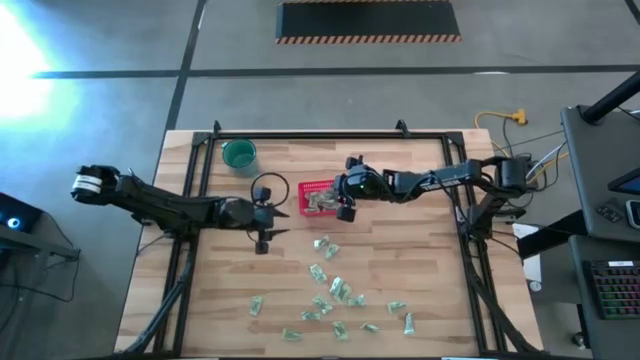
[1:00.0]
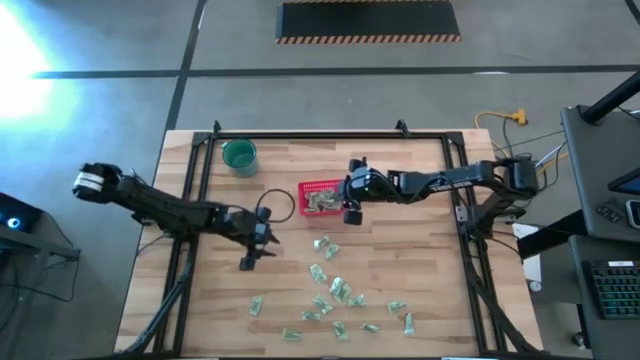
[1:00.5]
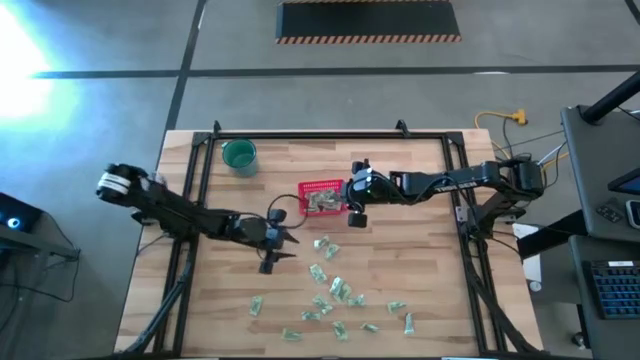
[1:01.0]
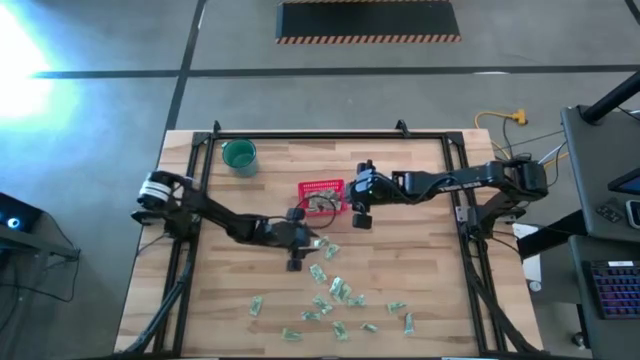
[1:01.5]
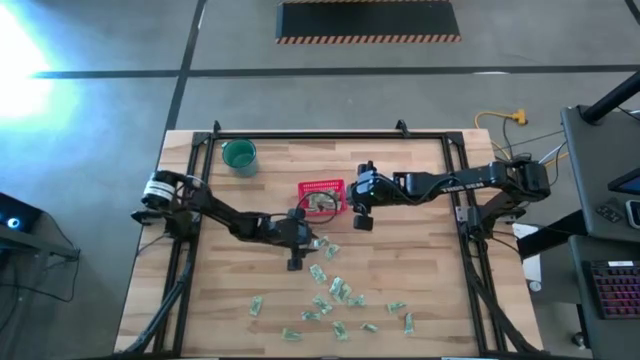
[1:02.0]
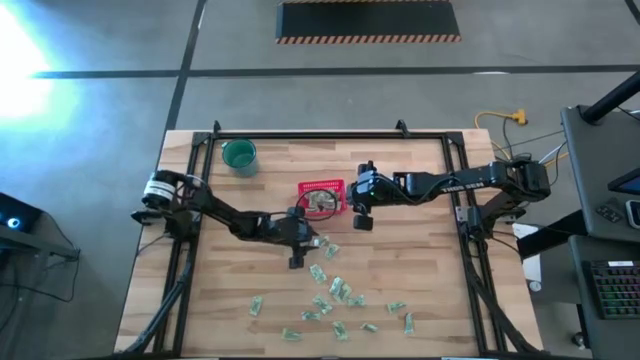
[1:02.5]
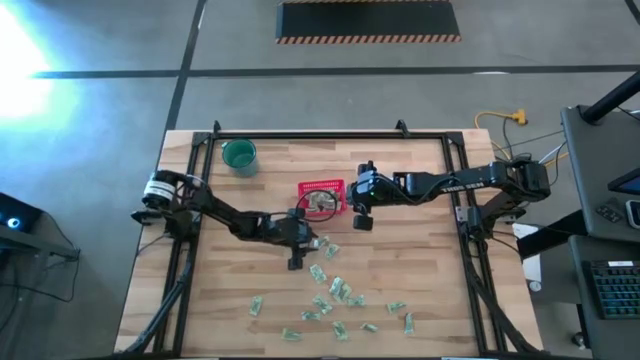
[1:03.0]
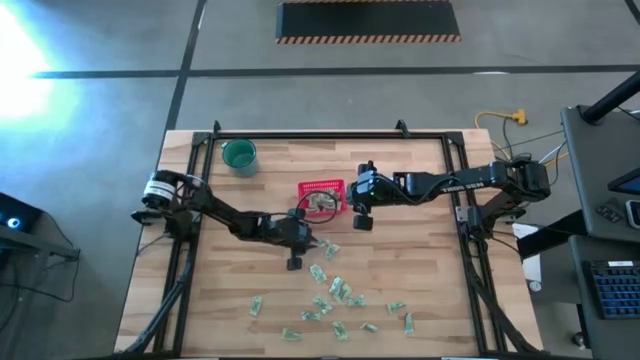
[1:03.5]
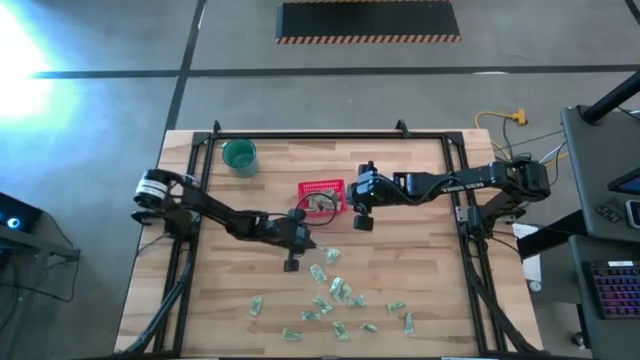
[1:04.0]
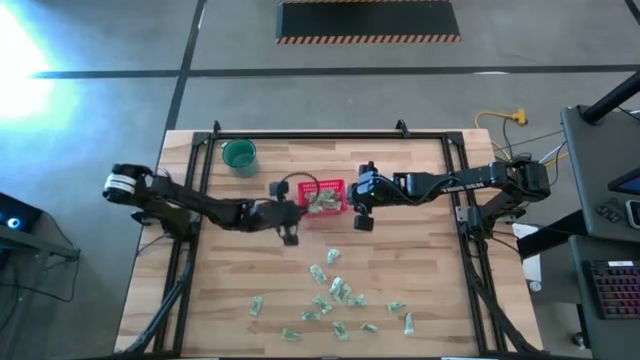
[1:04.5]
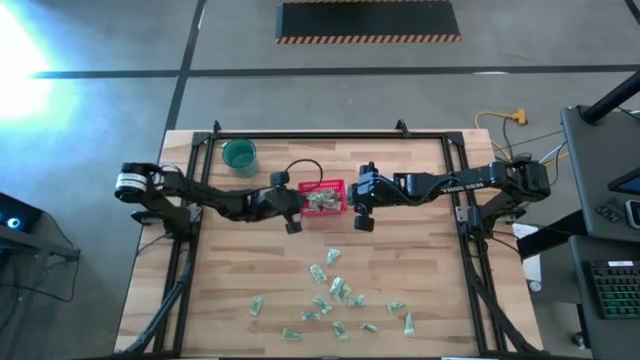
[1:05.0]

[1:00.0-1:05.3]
Task: Pick and place items into bin
Put the stevia packet into the red bin

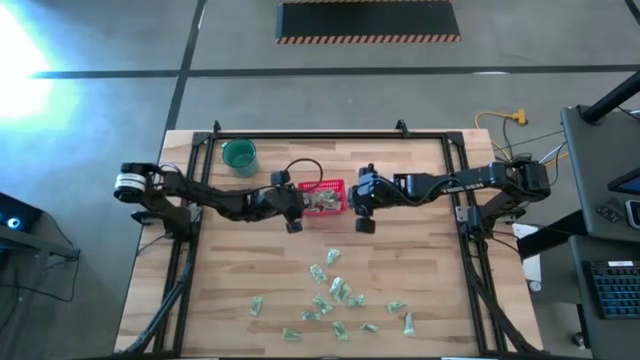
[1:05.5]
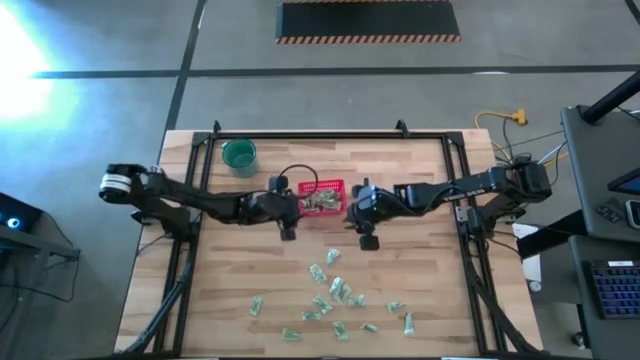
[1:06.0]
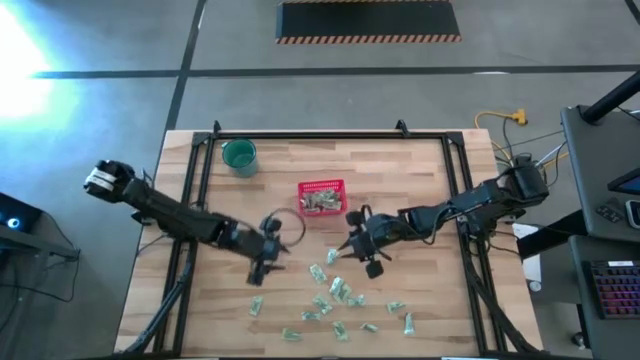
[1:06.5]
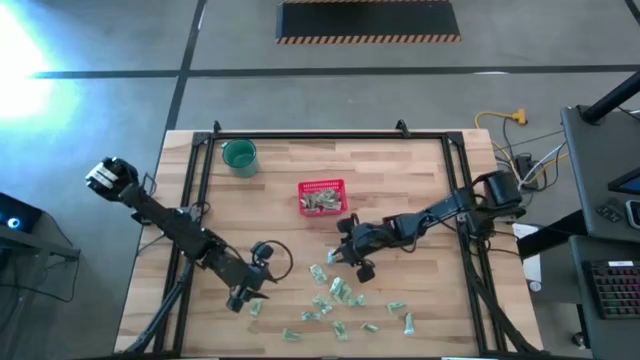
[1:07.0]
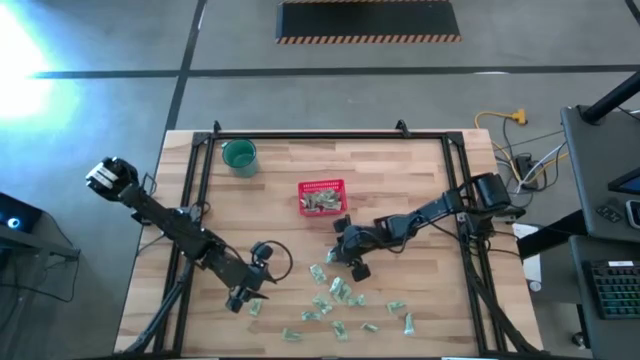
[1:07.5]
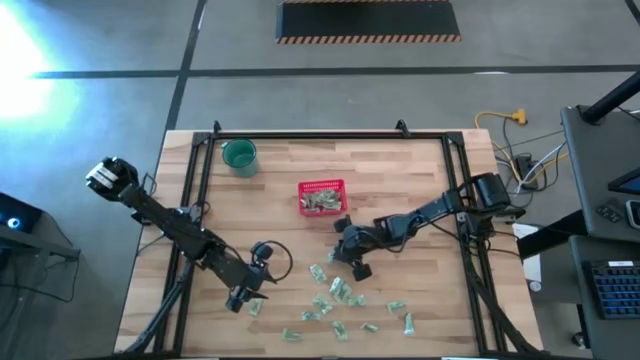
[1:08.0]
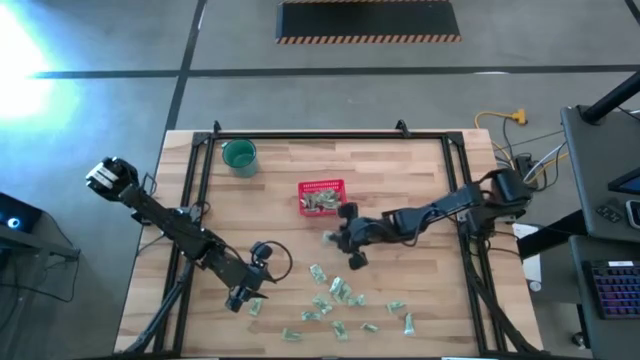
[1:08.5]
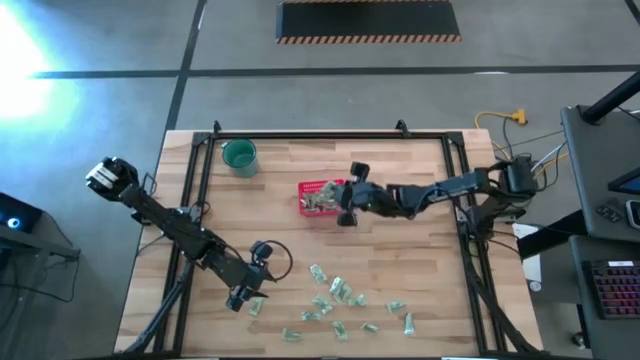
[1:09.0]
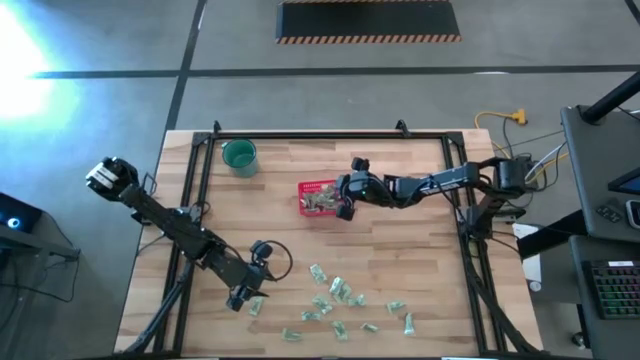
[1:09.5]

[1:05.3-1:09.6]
Put the stevia packet into the red bin

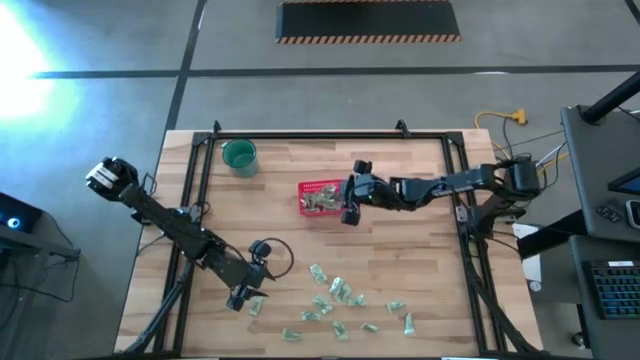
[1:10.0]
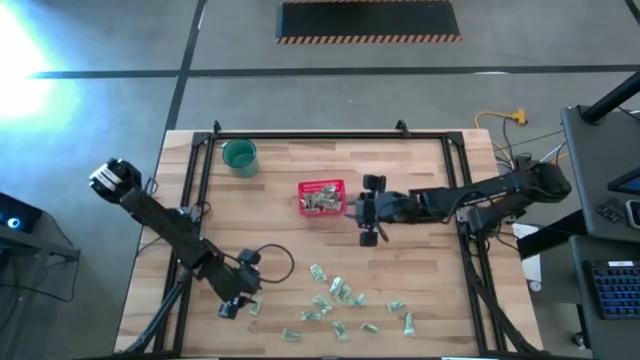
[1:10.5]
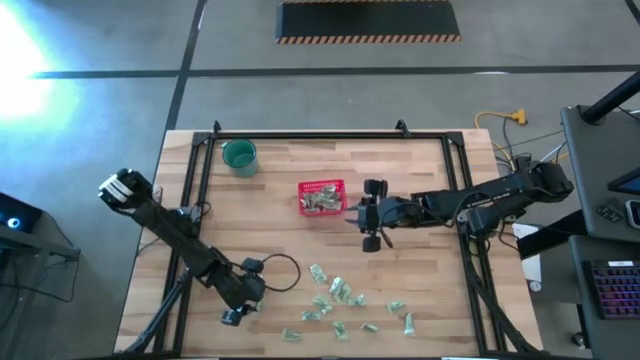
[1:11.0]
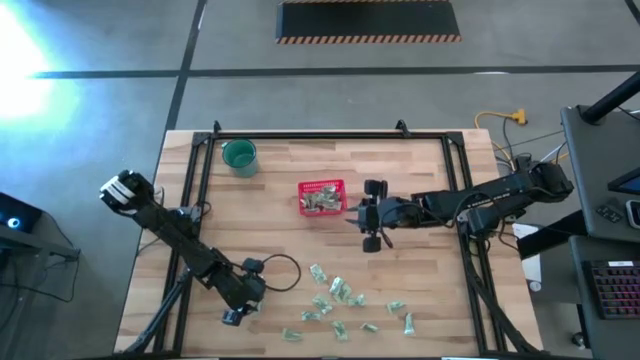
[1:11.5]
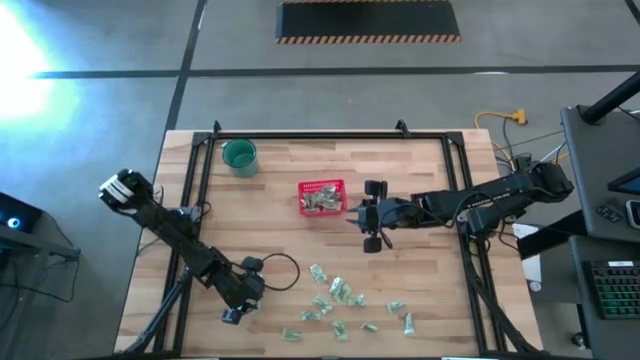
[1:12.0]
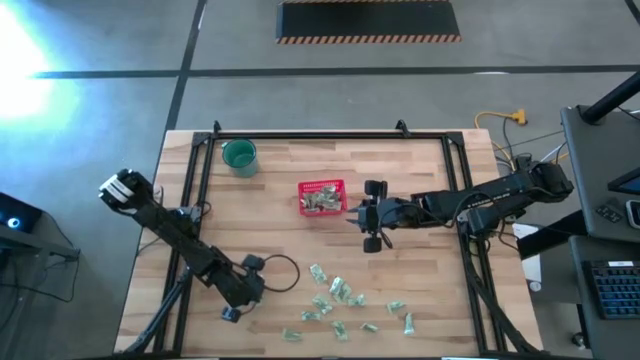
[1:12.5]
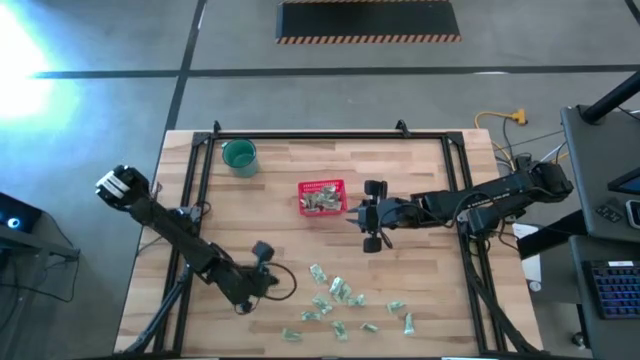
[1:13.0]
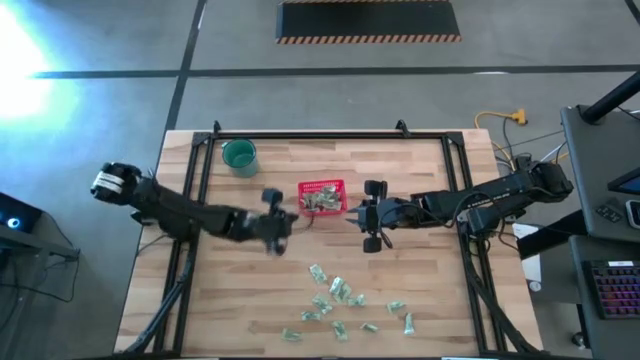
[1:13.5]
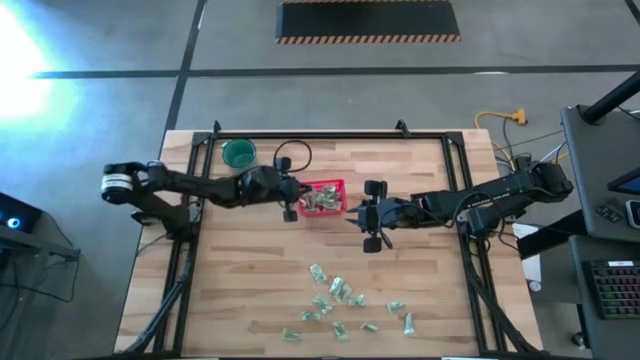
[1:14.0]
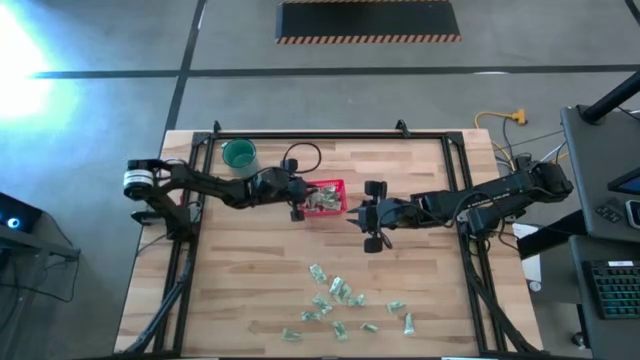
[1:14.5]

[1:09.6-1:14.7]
Put the stevia packet into the red bin

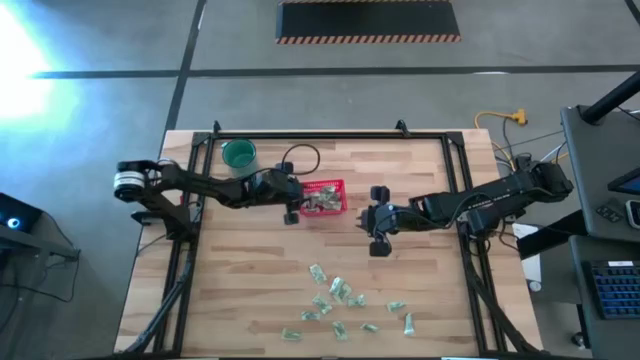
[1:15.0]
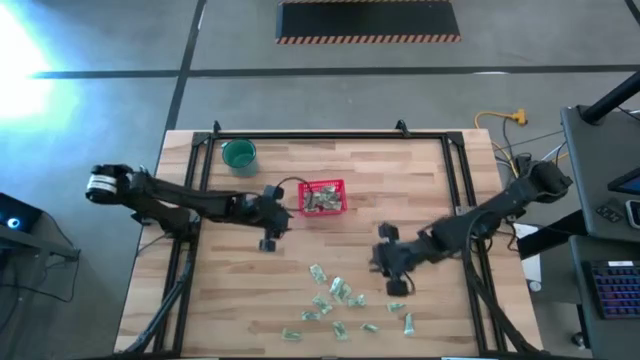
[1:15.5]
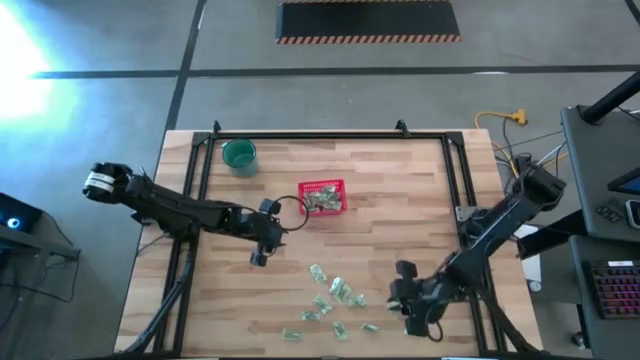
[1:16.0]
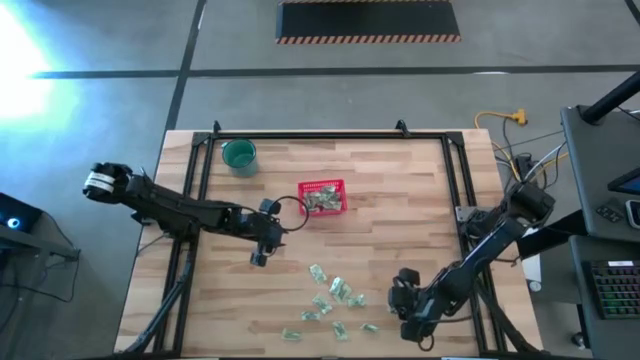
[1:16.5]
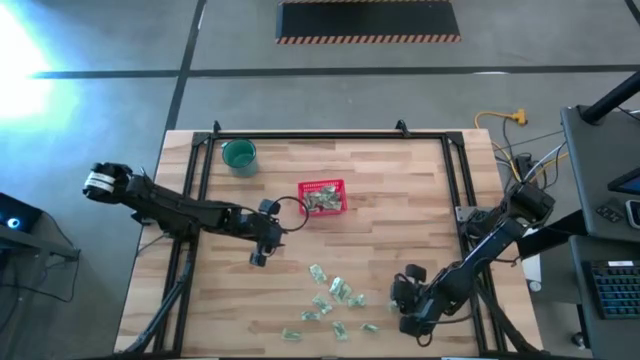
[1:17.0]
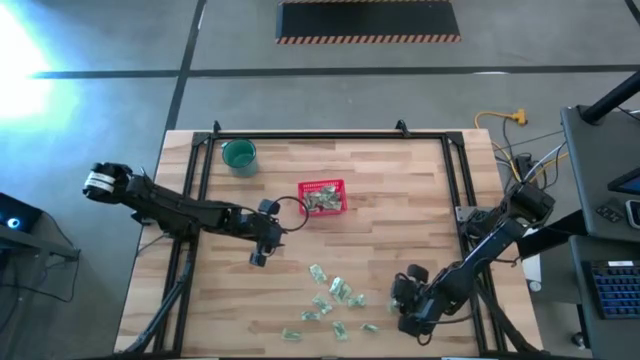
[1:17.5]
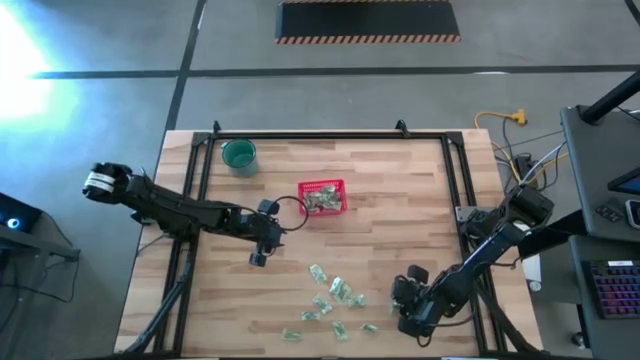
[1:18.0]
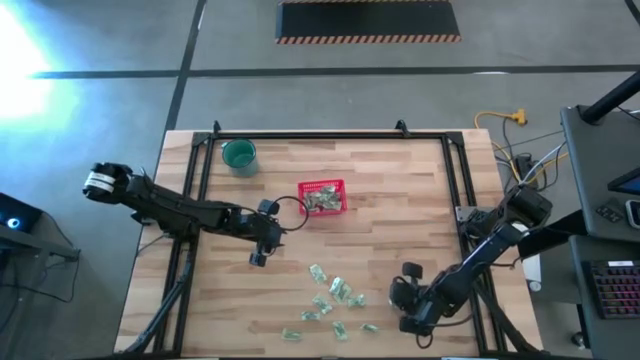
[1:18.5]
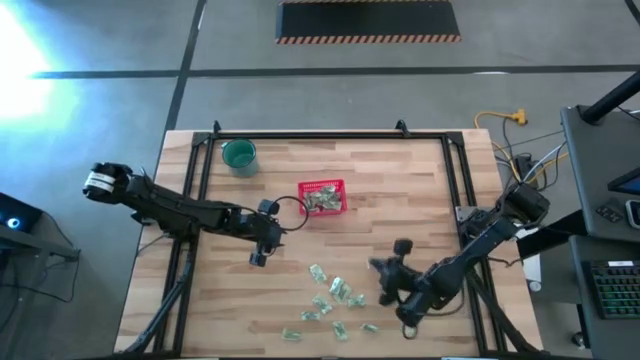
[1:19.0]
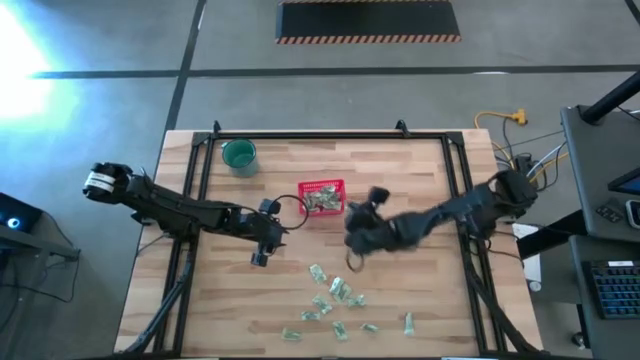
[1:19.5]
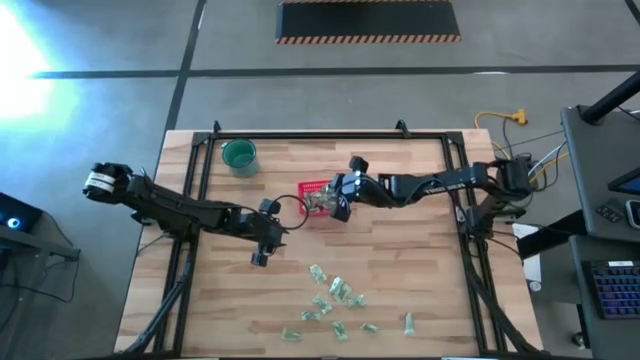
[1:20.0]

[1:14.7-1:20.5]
Put the stevia packet into the red bin

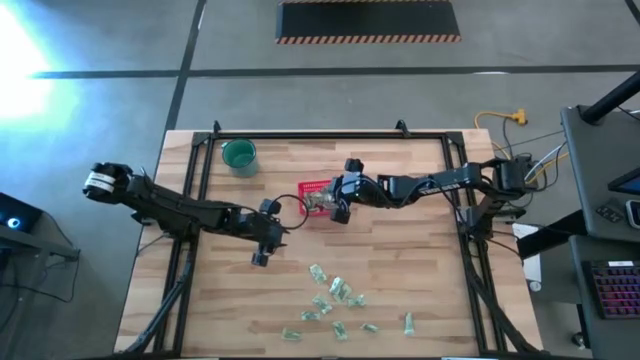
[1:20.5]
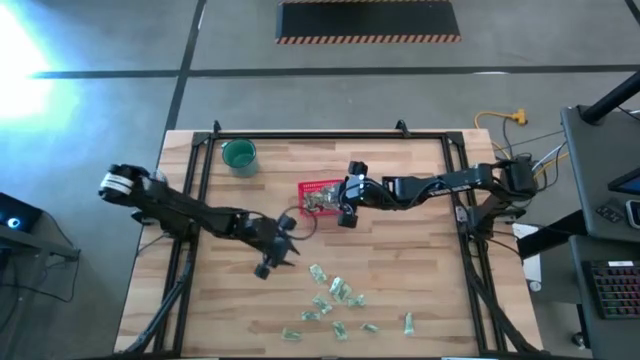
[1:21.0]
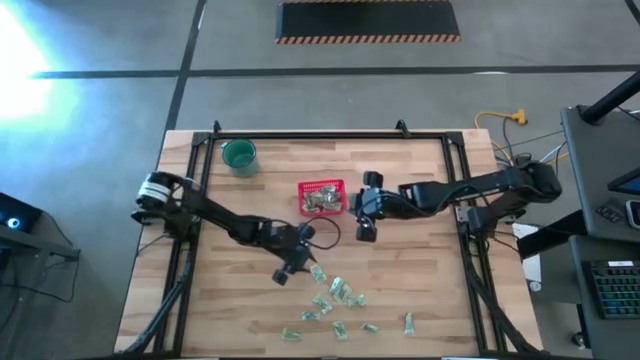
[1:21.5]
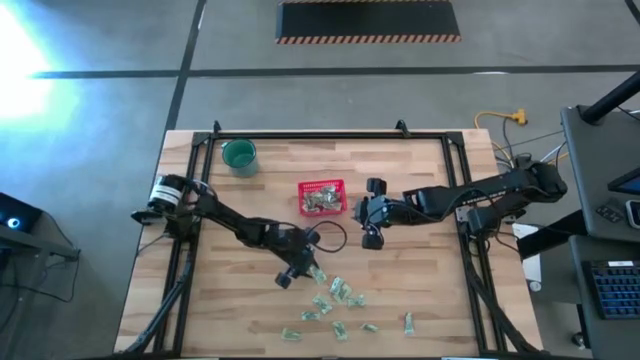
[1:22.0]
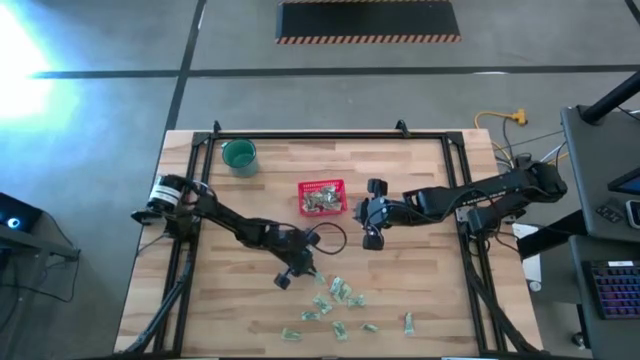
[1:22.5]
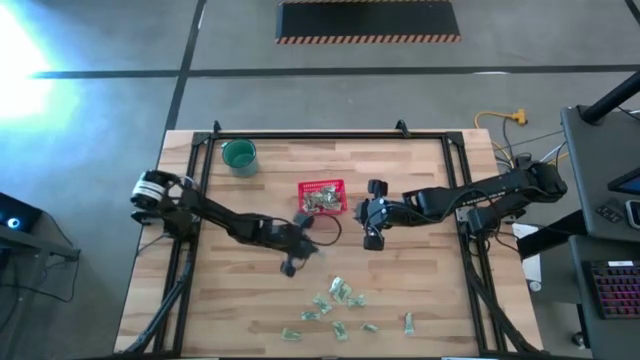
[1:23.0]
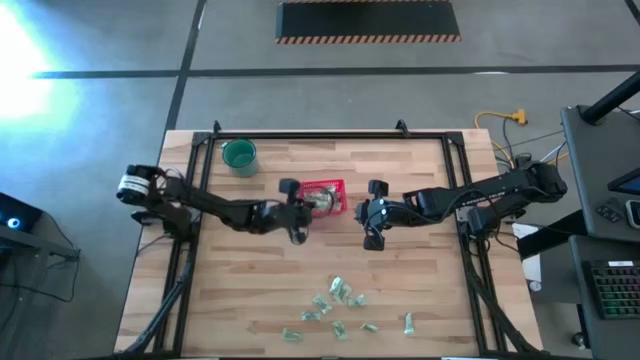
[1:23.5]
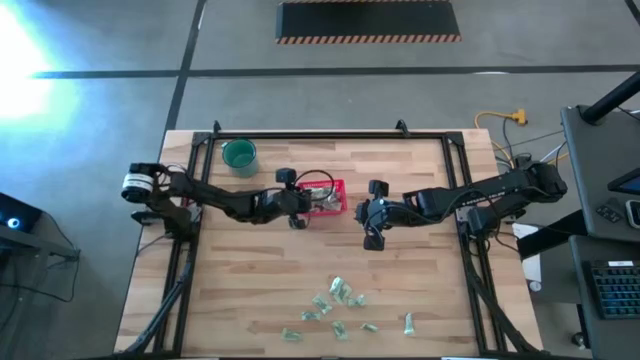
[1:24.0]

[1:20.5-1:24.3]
Put the stevia packet into the red bin
